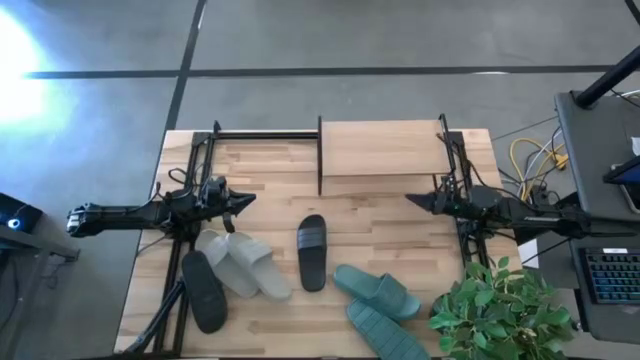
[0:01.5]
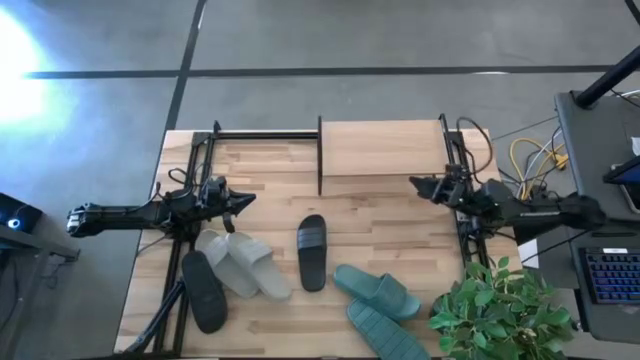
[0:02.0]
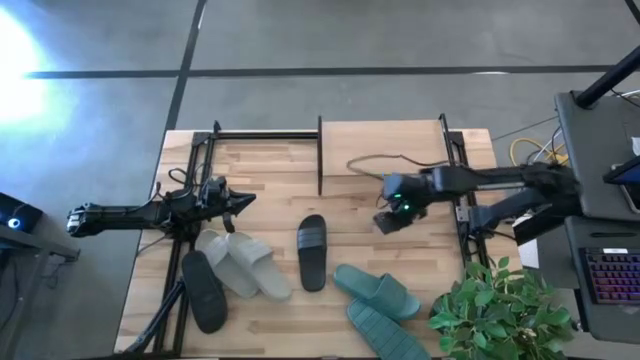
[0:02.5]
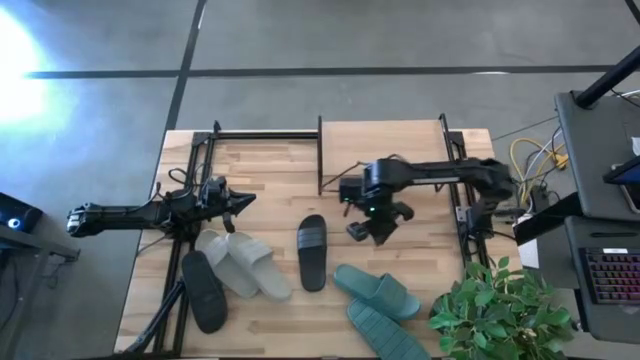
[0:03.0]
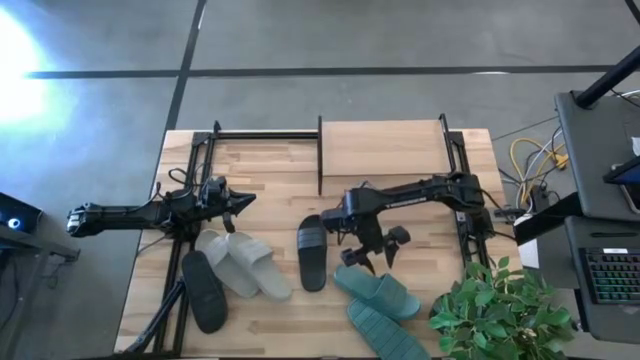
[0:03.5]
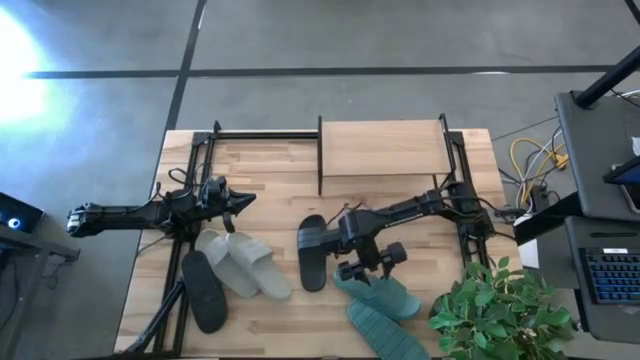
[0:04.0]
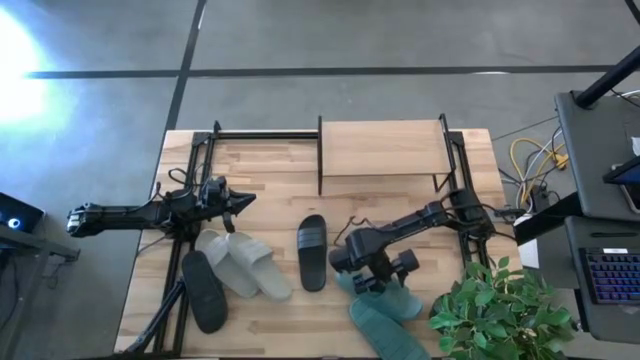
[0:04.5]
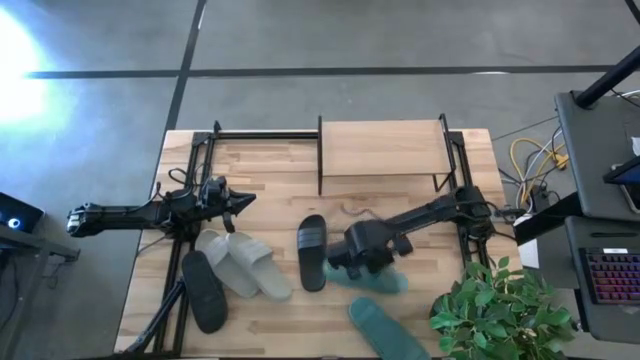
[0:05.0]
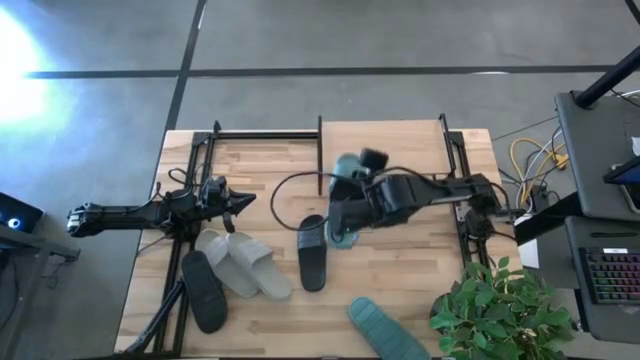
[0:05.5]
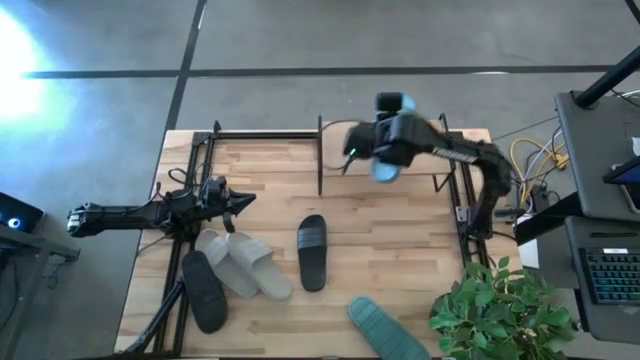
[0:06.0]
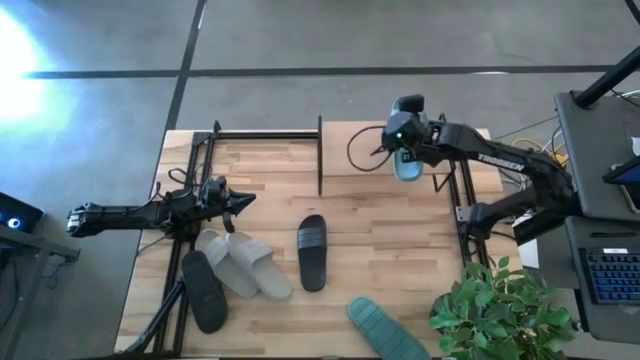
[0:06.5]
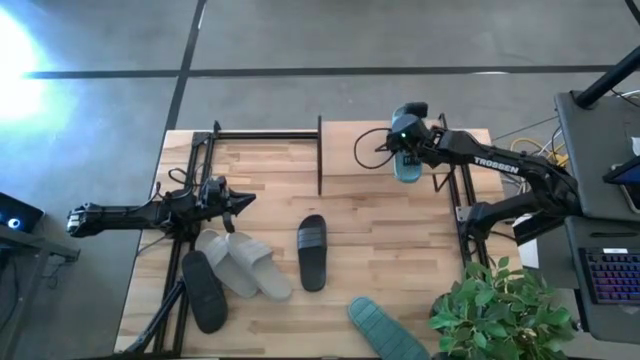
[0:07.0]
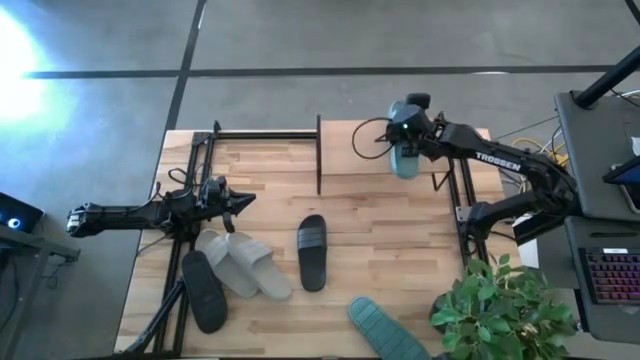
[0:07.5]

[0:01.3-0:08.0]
Task: Pick and place slides into the shelf
Put the top green slipper on the shelf

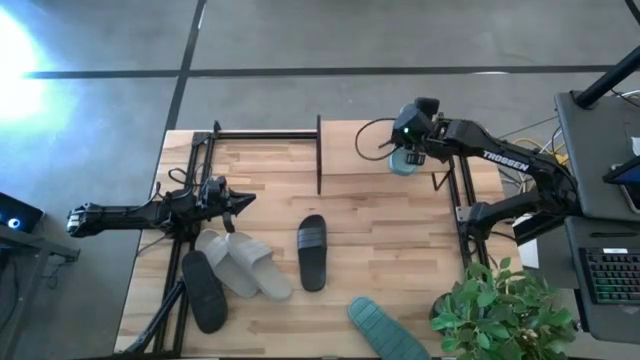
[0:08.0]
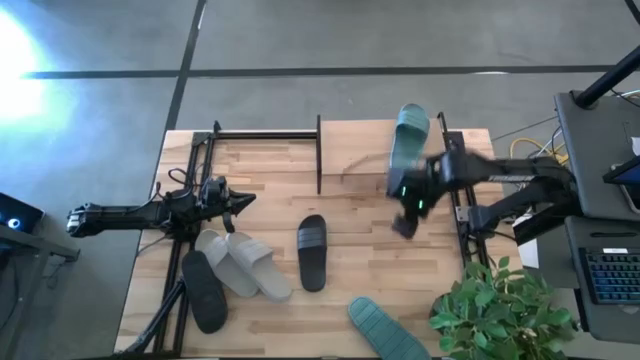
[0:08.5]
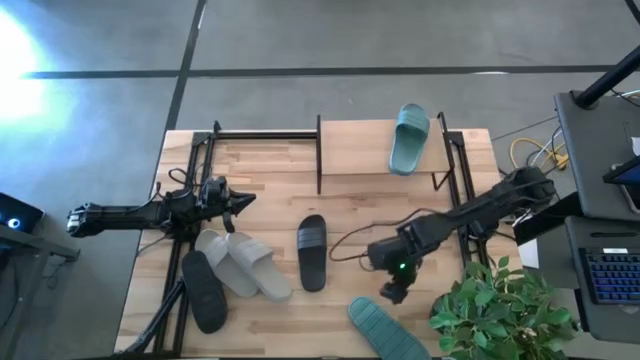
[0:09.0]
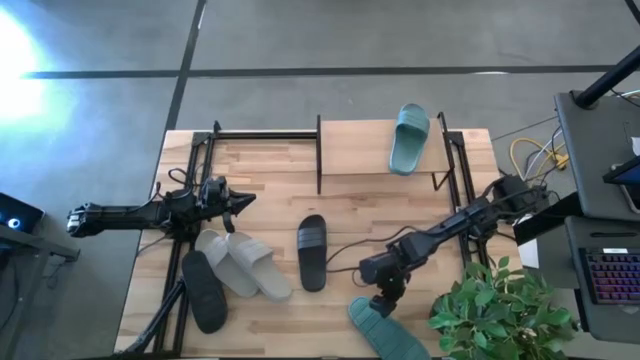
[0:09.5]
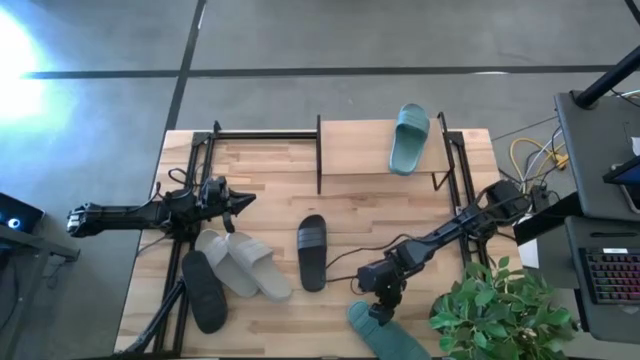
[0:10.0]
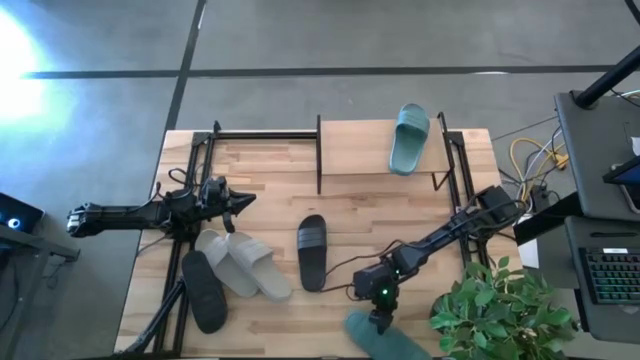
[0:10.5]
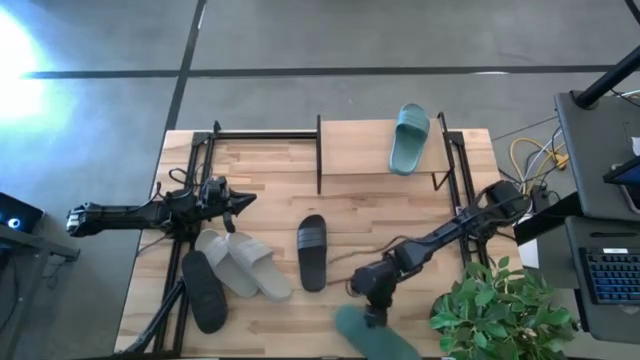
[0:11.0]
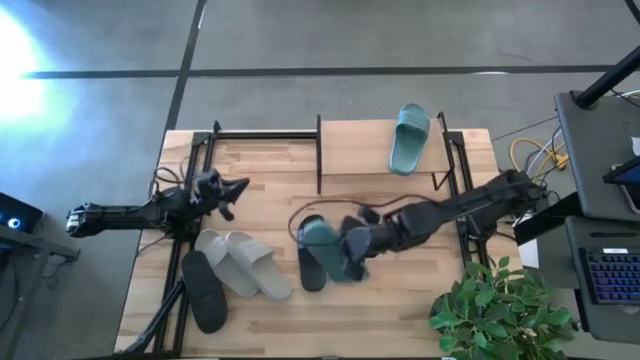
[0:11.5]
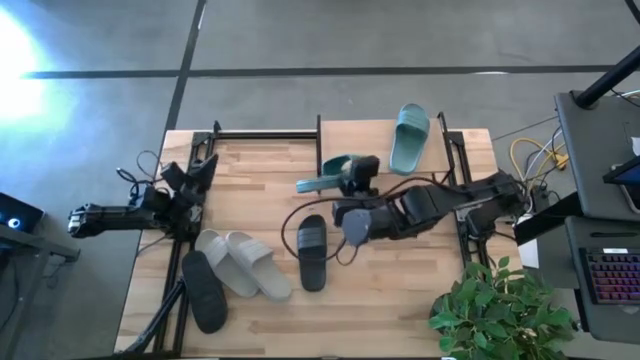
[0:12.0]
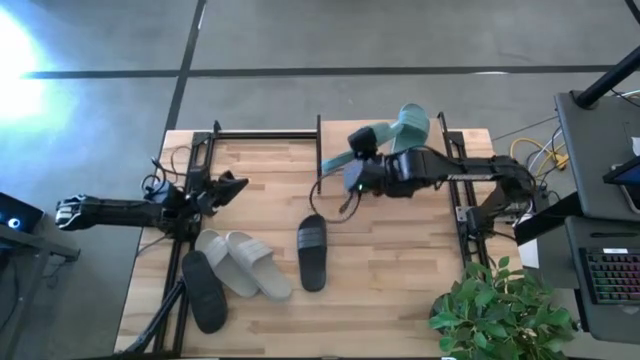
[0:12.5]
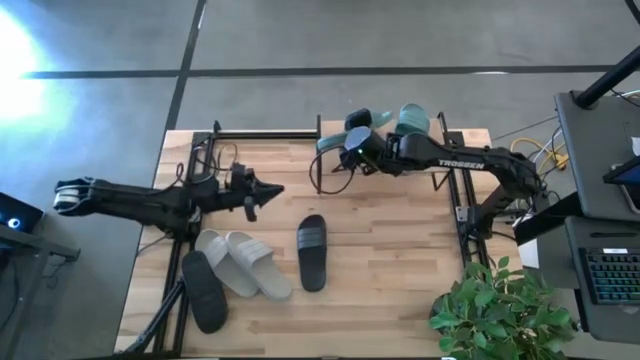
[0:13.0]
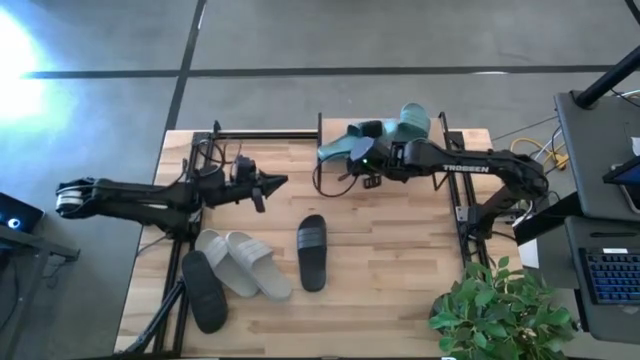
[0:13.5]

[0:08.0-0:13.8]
Put the green slipper on the shelf

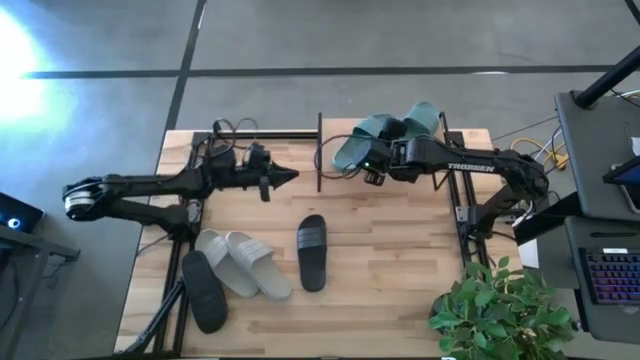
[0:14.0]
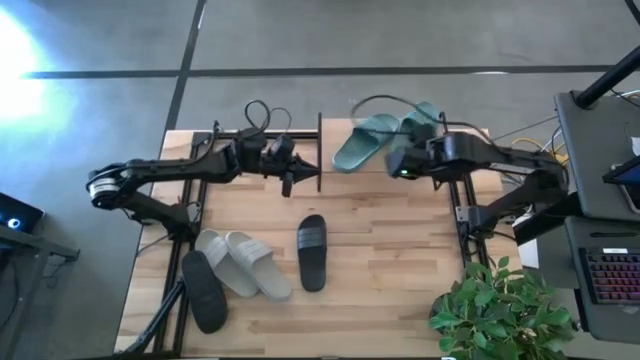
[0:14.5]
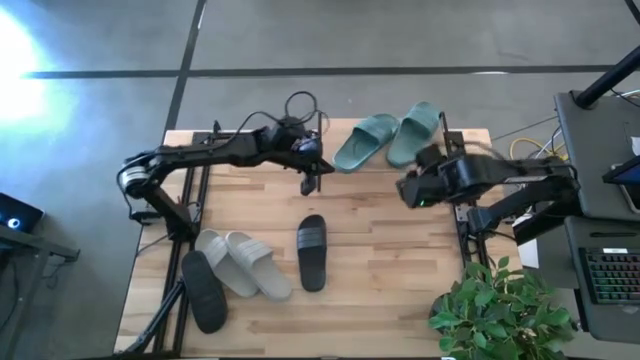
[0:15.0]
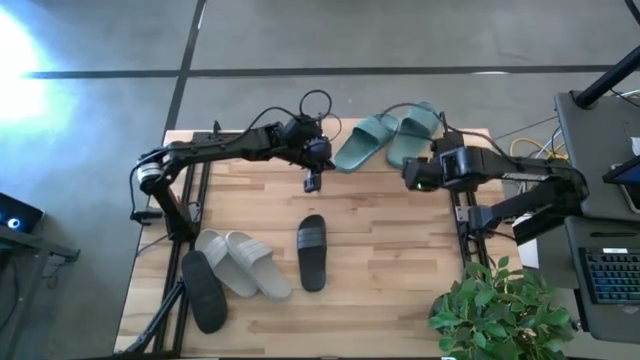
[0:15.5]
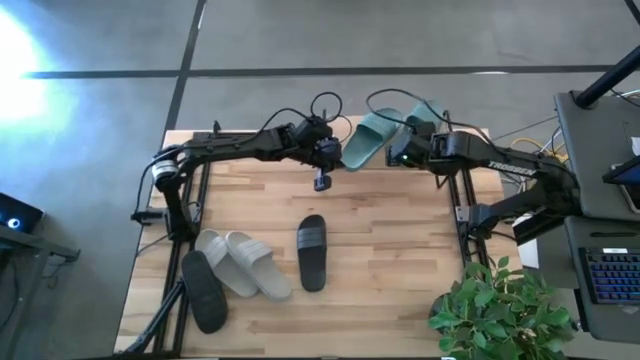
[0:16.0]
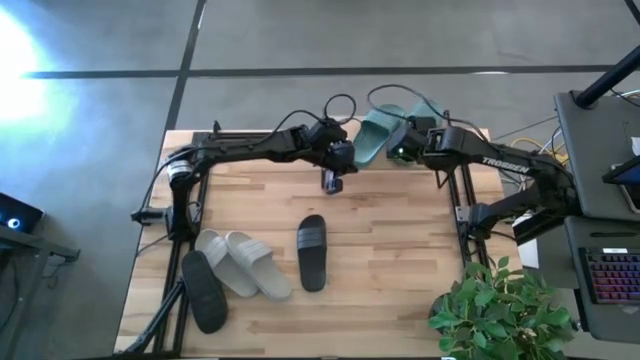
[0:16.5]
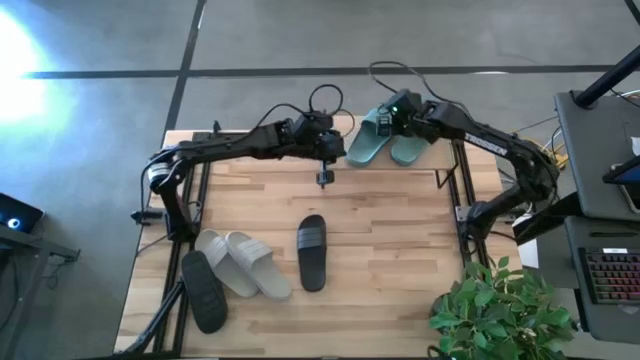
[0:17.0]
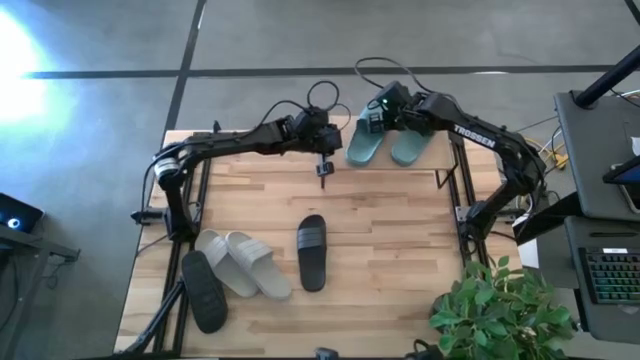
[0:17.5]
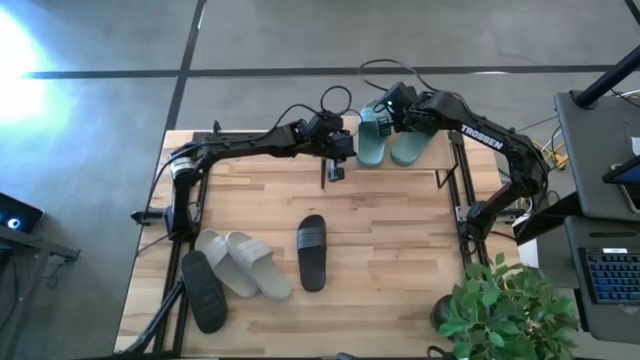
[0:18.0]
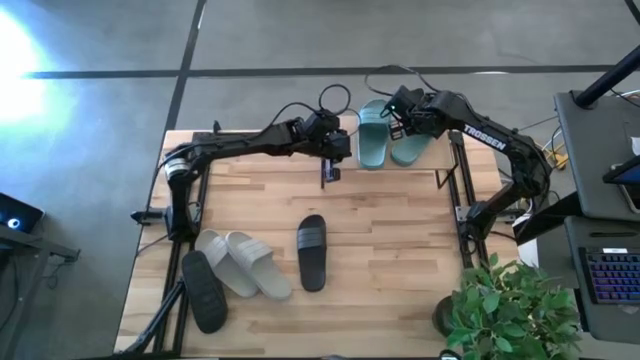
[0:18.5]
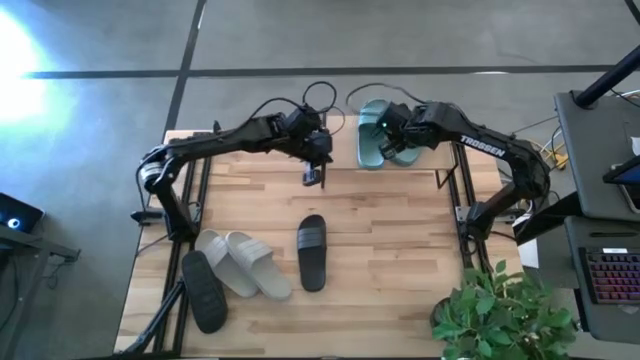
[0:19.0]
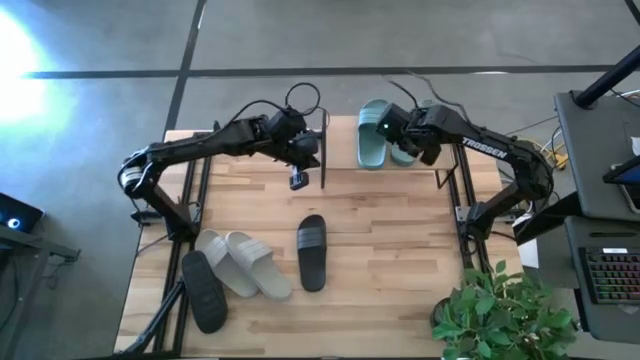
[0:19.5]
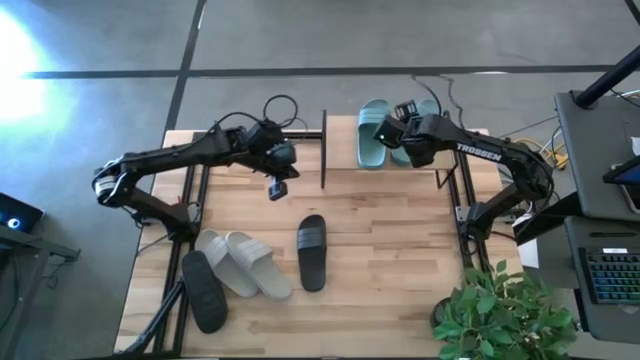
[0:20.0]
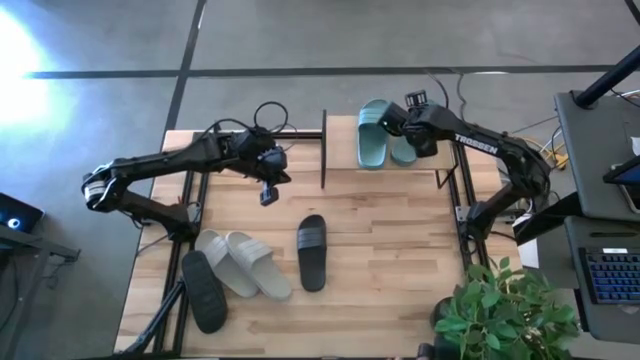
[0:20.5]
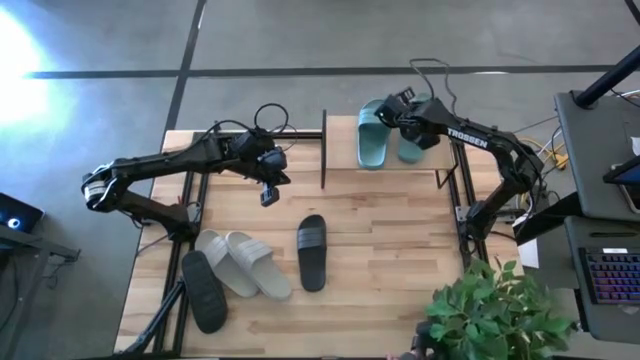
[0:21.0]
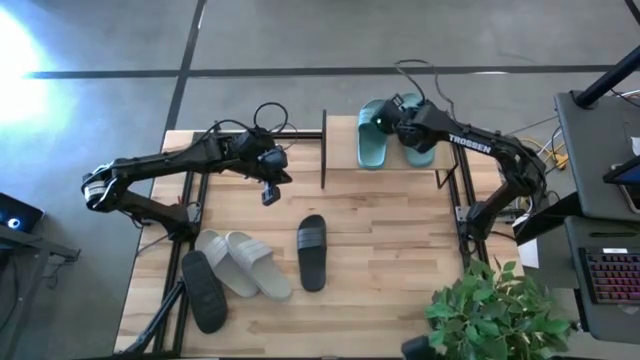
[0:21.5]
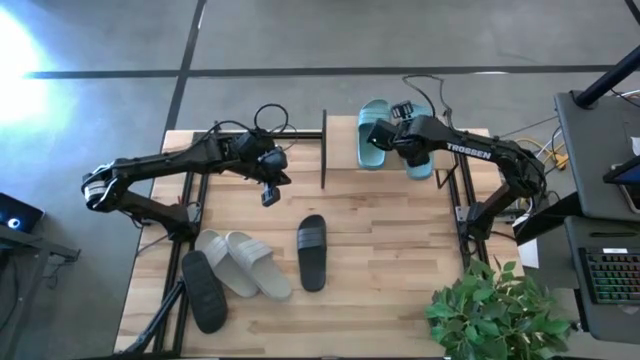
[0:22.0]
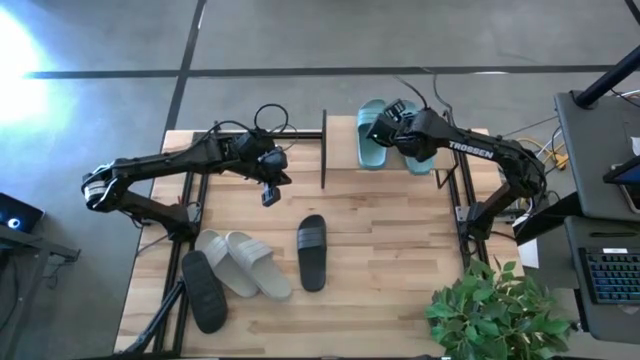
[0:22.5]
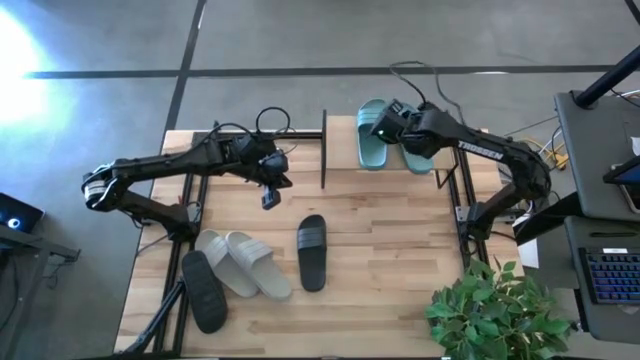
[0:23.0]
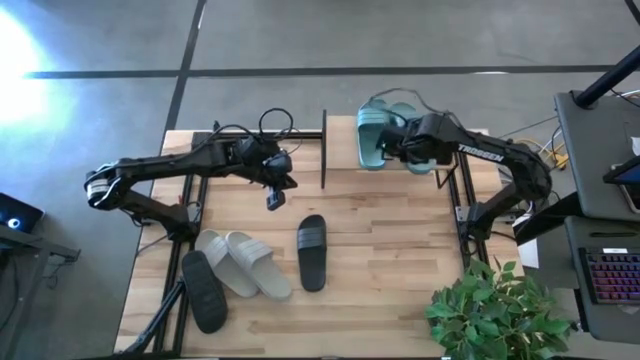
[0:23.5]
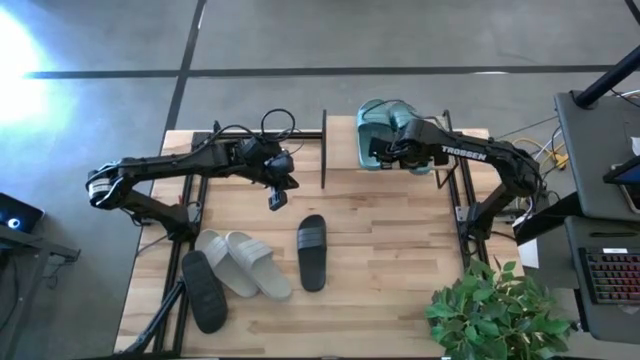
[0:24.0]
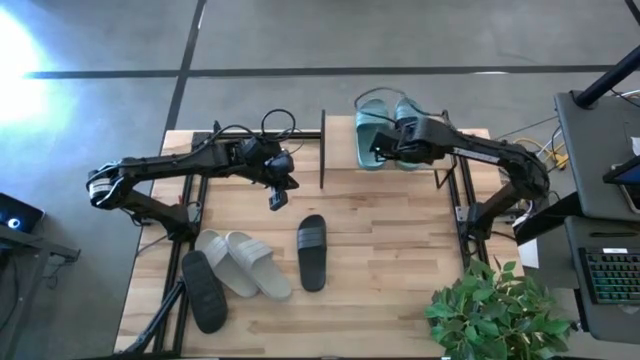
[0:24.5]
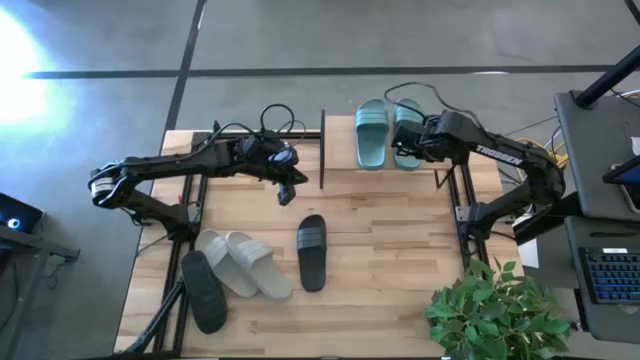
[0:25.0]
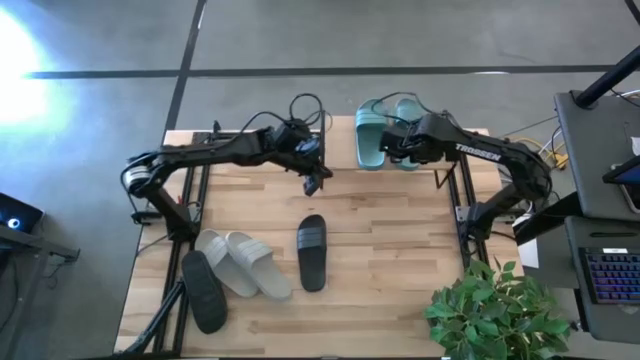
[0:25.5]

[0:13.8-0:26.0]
Adjust the green slippers on the shelf
